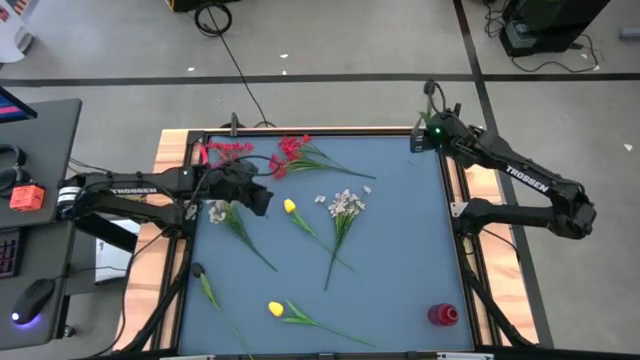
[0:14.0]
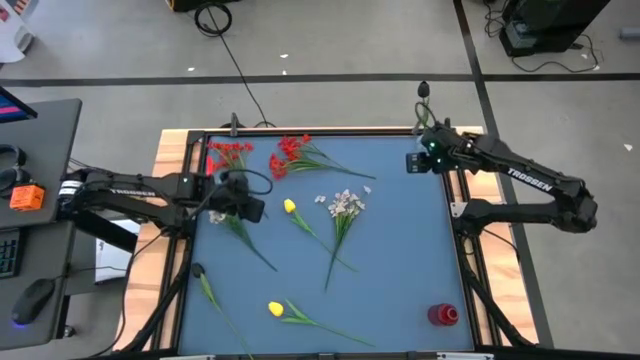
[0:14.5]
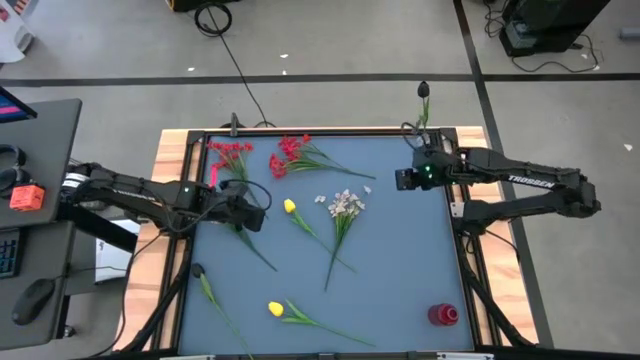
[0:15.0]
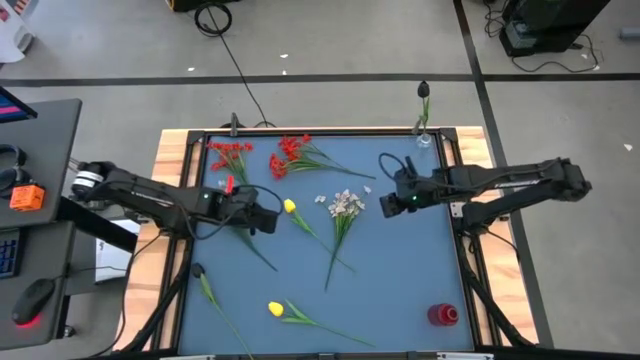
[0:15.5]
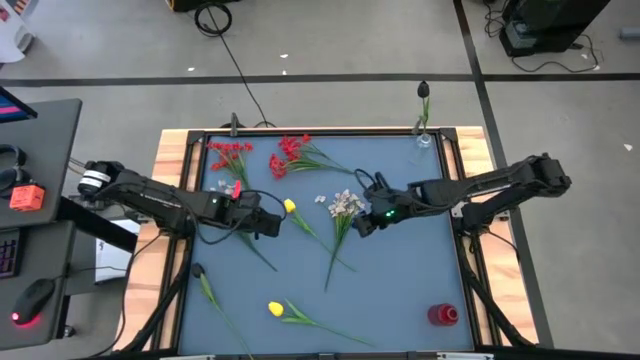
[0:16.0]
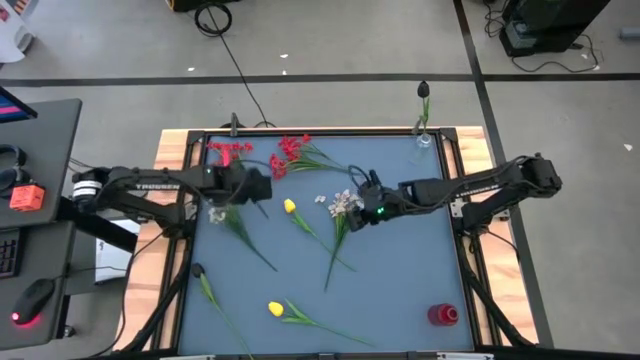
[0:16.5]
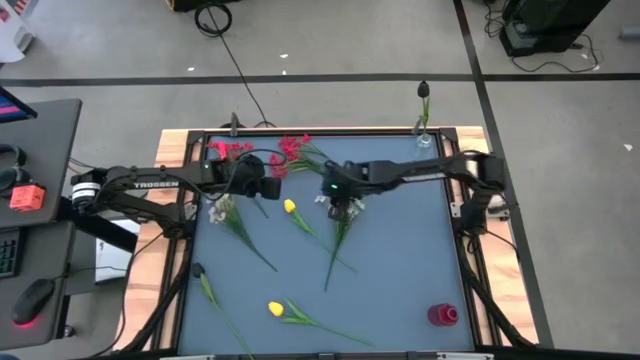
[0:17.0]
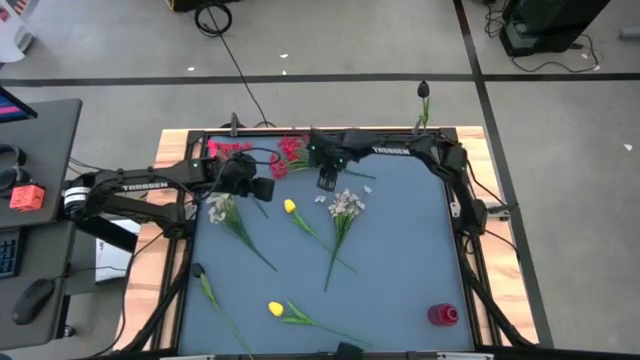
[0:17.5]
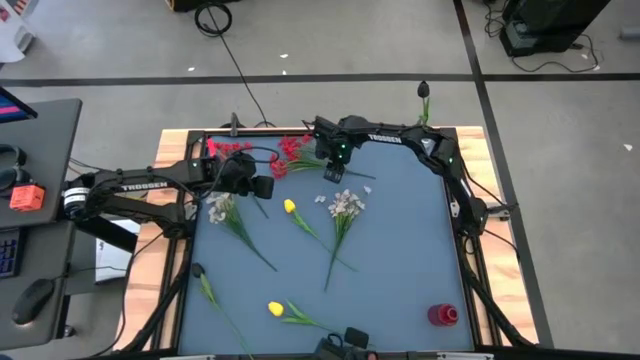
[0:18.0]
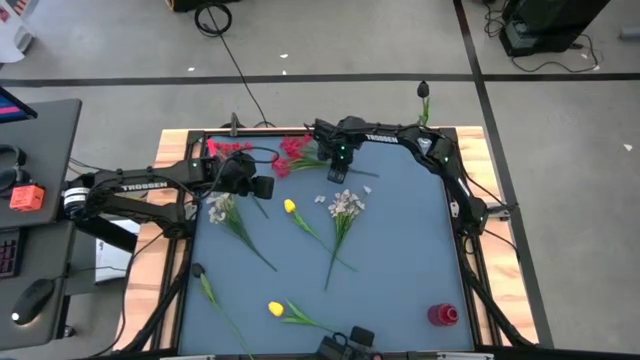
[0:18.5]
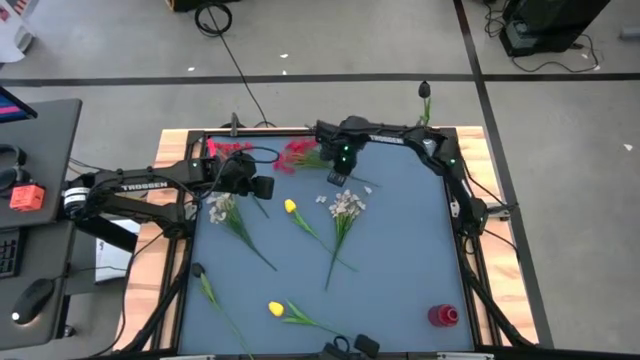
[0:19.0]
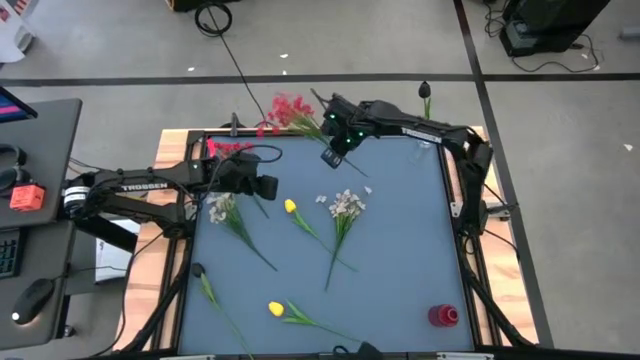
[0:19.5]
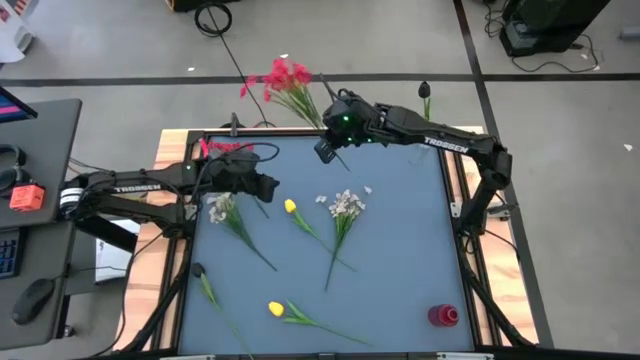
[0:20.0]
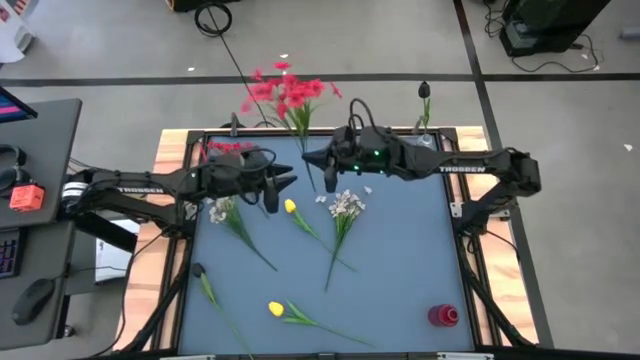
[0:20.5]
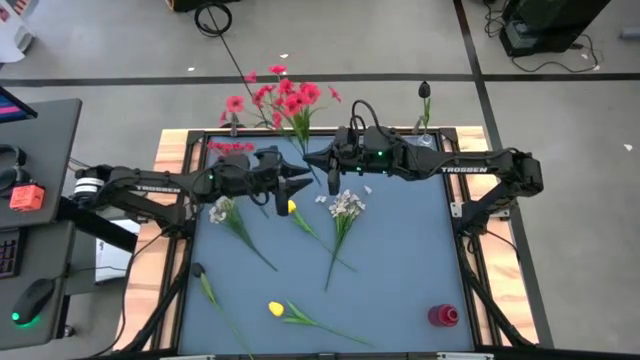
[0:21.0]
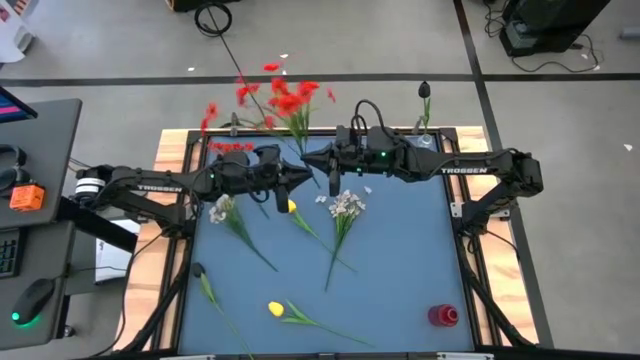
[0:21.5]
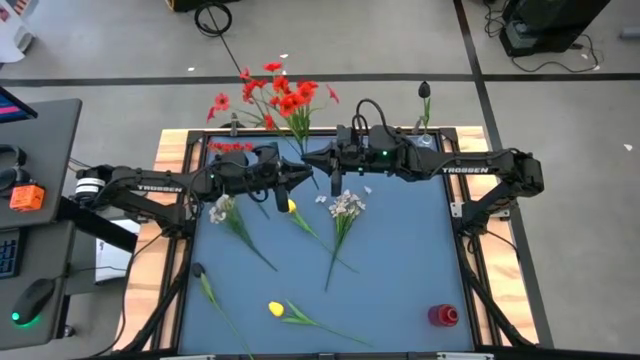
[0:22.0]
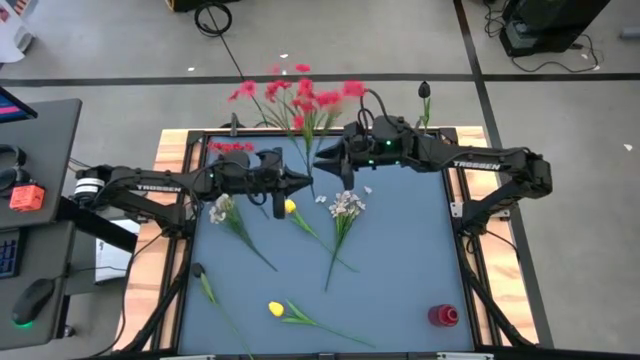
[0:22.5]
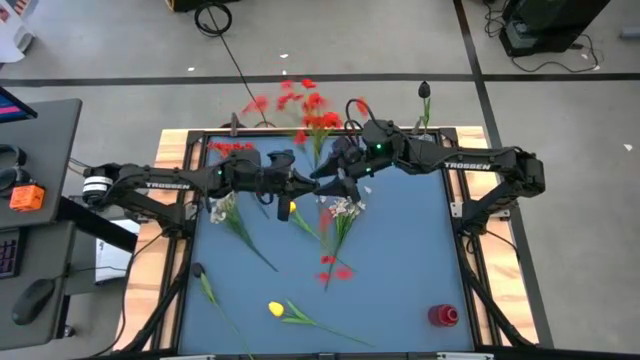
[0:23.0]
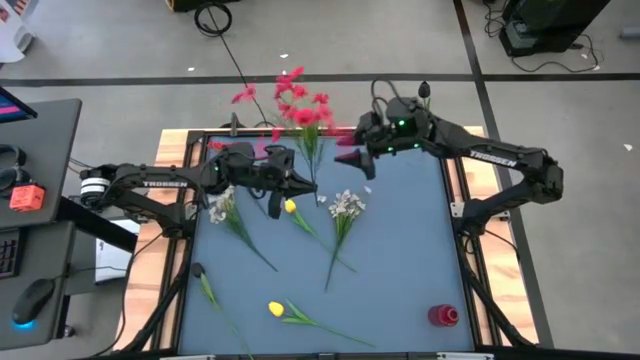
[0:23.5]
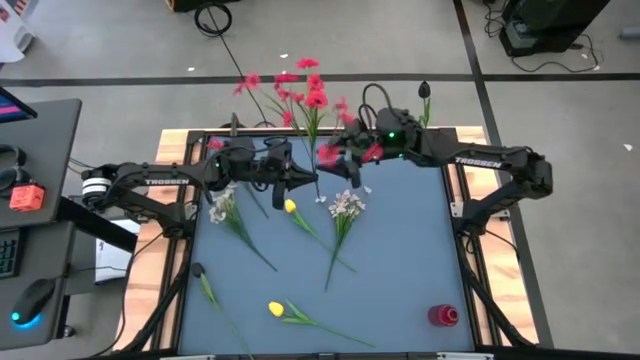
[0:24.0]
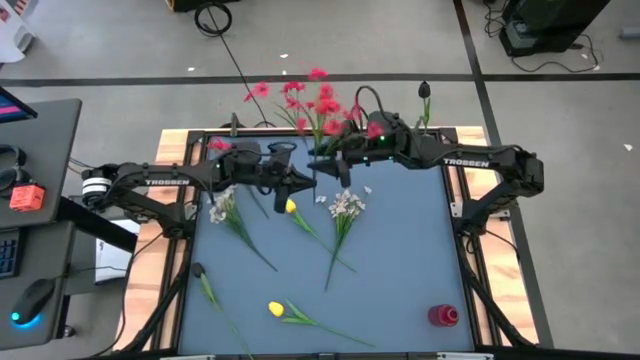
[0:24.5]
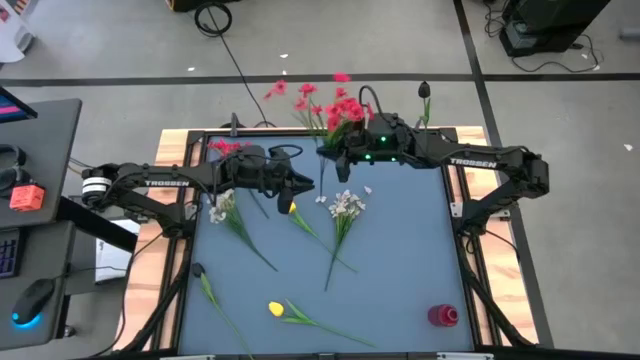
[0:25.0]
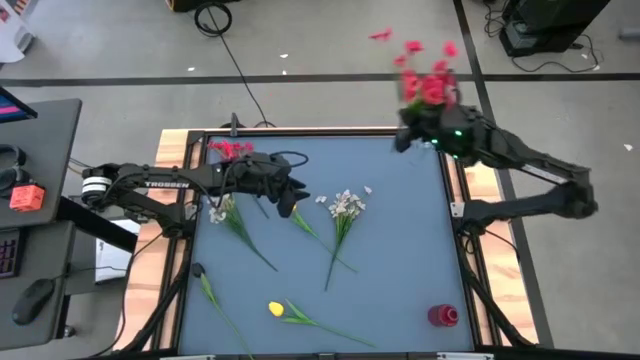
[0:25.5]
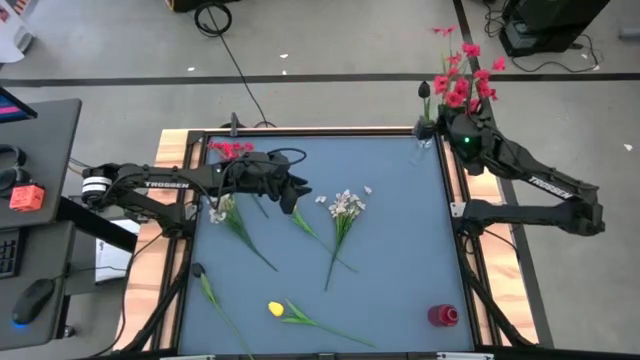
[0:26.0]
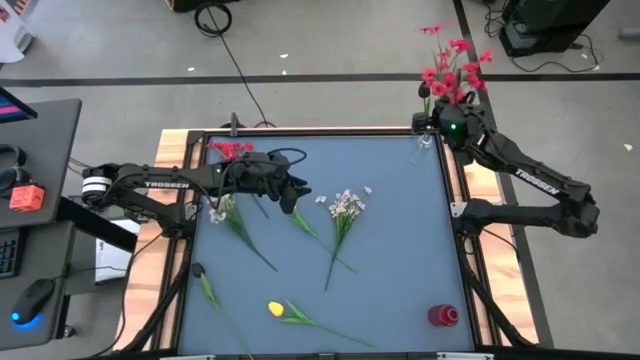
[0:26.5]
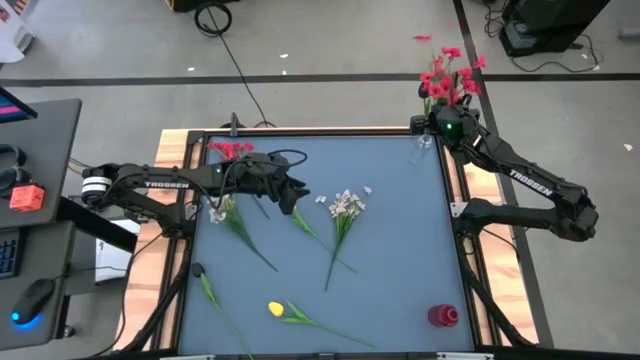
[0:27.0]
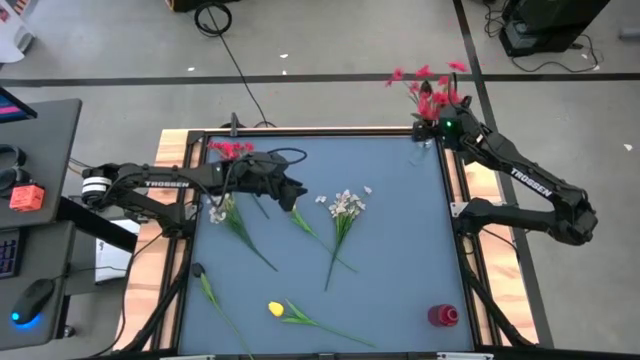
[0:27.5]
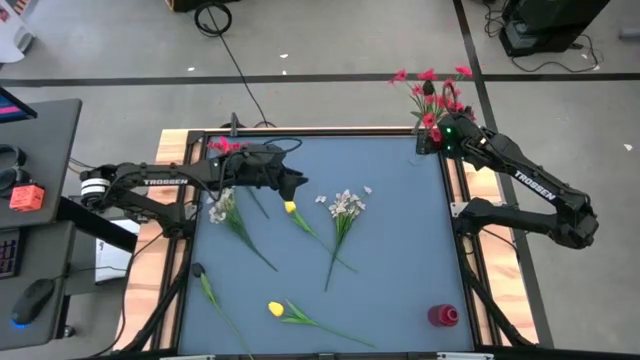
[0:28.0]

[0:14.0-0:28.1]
Task: Sort flowers into vase by color
Put the right red flowers into the transparent vase

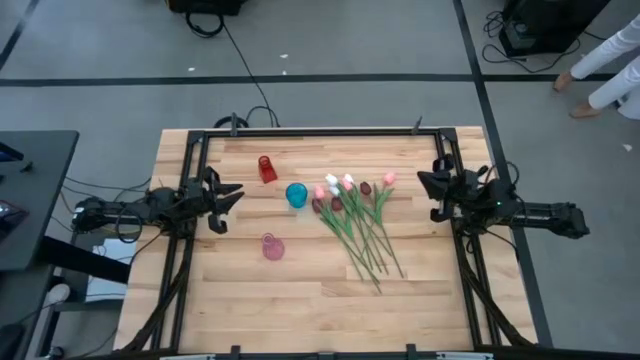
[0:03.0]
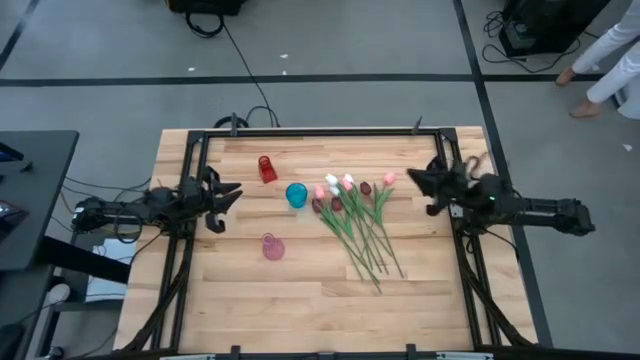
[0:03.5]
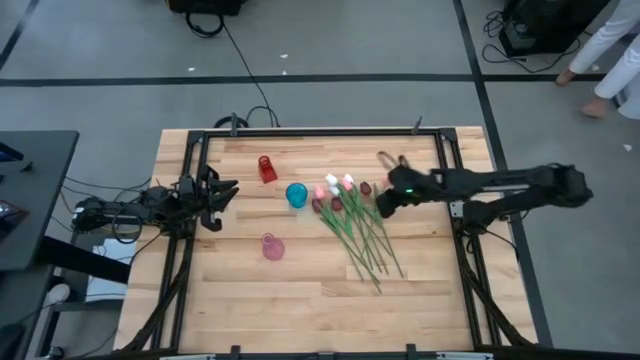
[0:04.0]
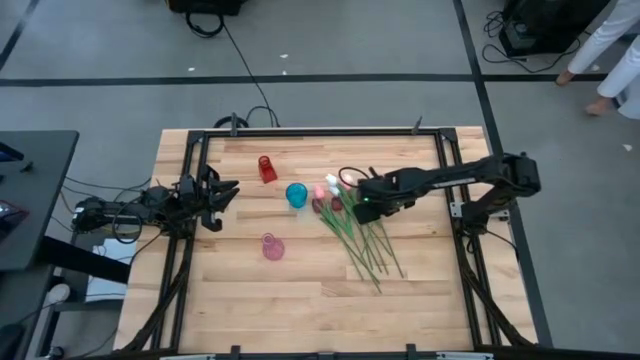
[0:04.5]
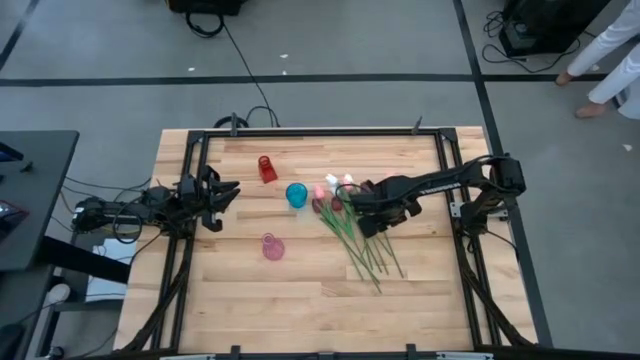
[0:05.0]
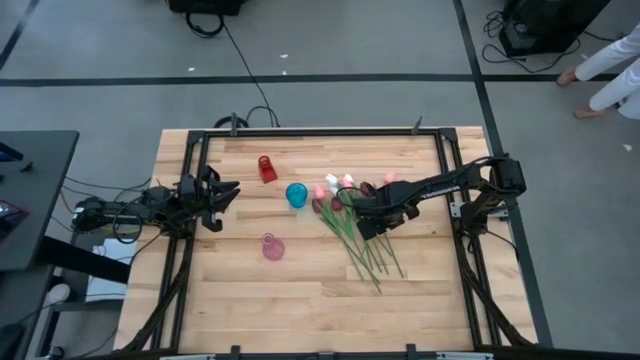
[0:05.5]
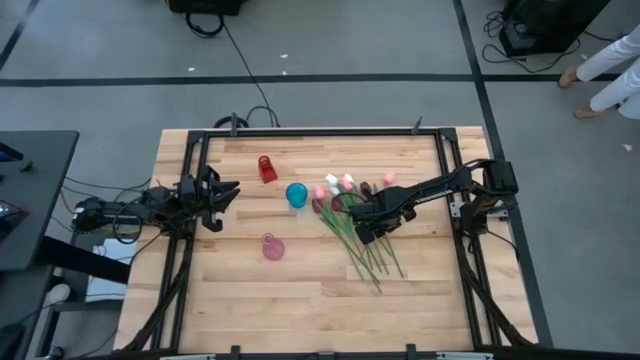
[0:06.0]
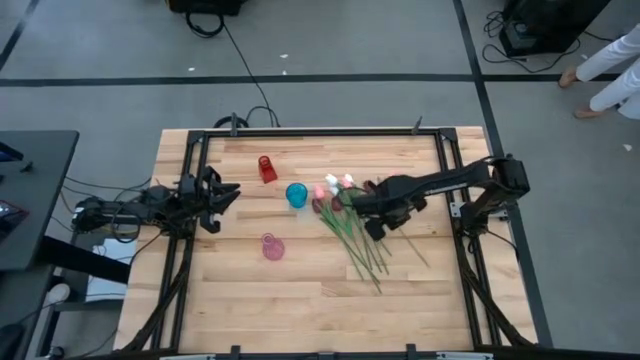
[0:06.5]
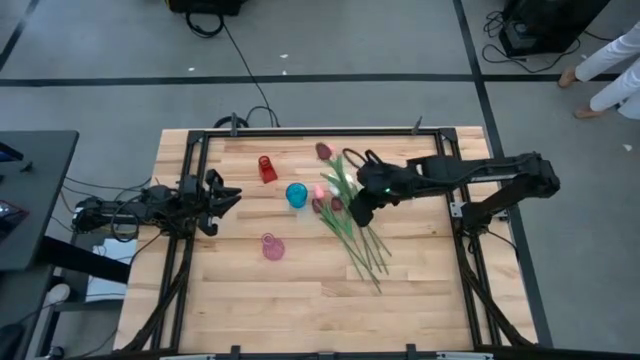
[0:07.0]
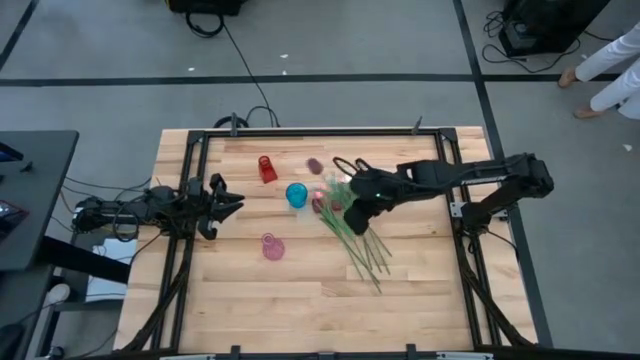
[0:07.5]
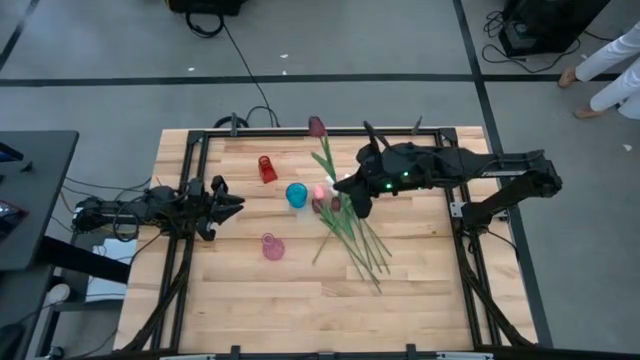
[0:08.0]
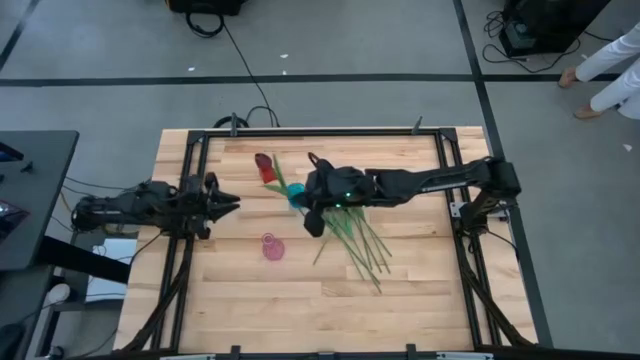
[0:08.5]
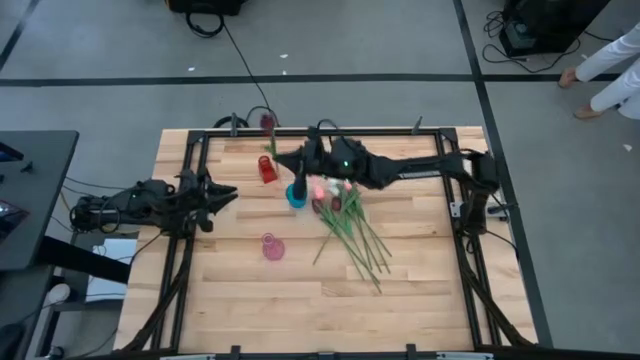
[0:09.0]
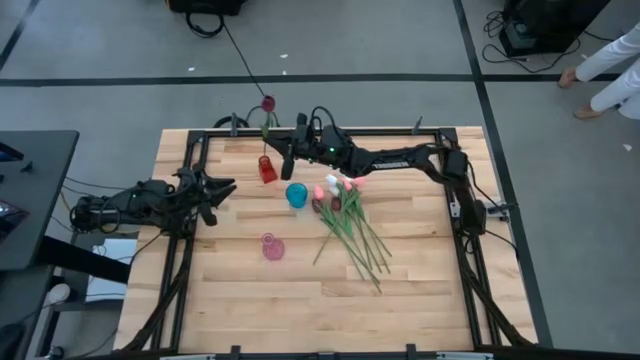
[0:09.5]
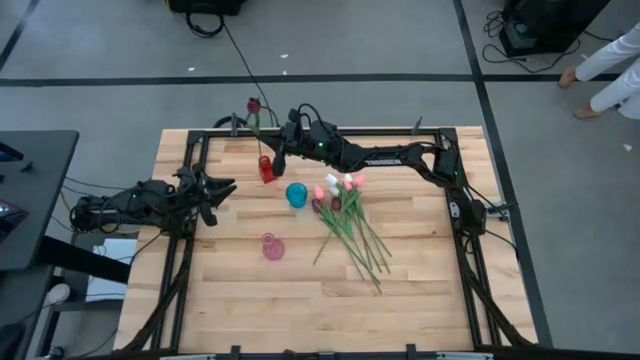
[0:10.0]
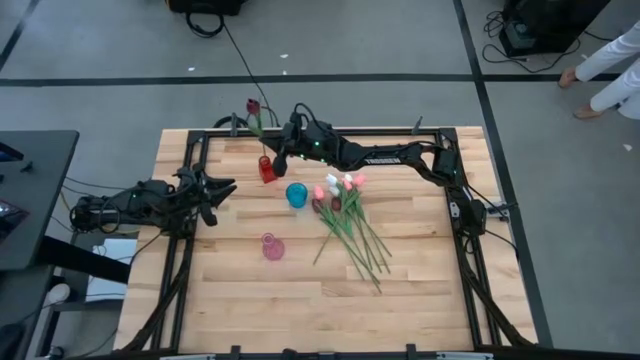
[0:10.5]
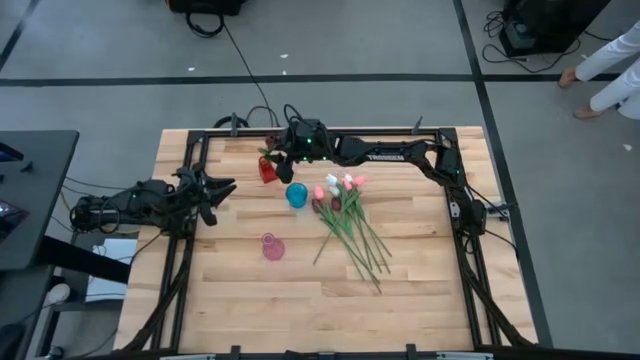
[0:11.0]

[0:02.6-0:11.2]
Task: Sort flowers into vase by color
Put the middle right red flower into the red vase
